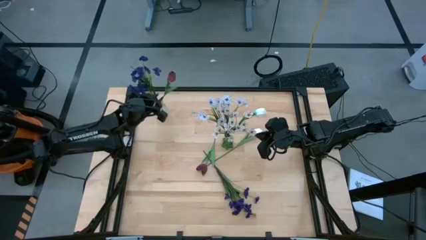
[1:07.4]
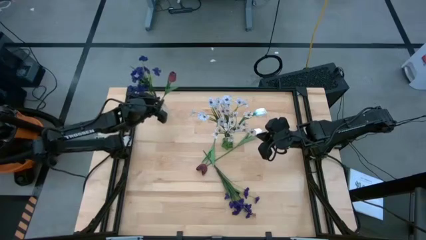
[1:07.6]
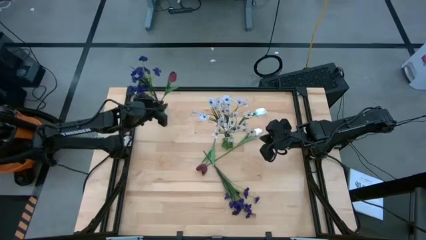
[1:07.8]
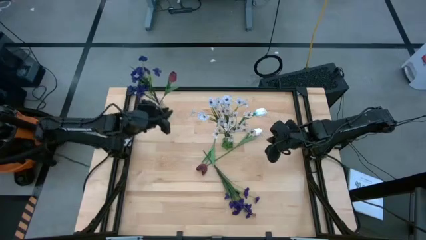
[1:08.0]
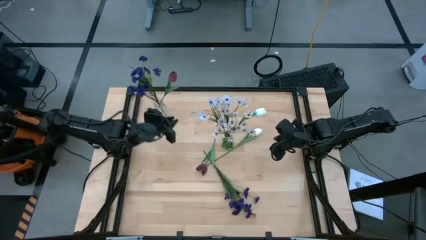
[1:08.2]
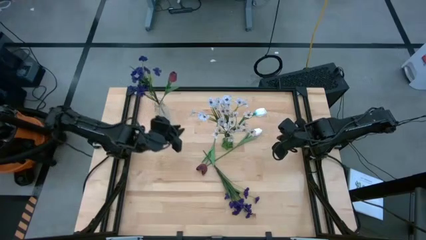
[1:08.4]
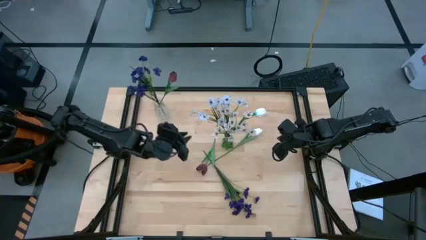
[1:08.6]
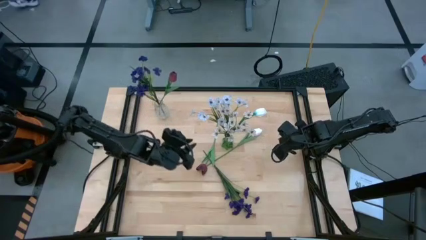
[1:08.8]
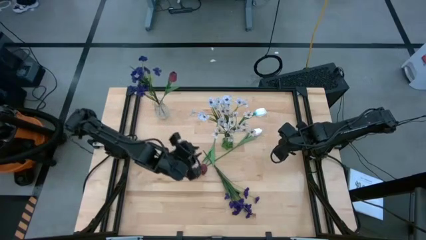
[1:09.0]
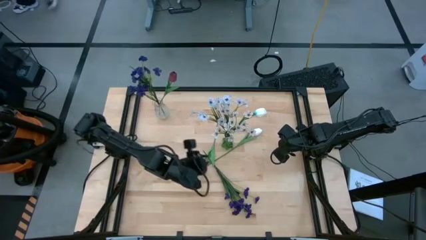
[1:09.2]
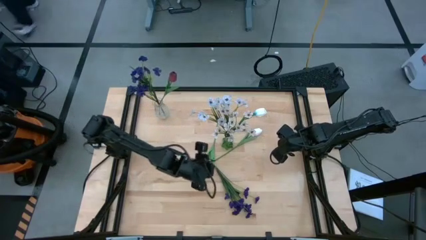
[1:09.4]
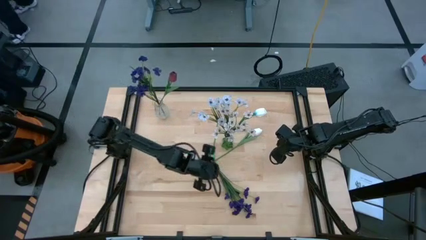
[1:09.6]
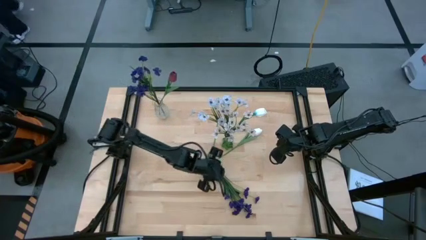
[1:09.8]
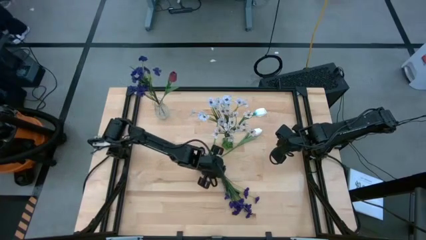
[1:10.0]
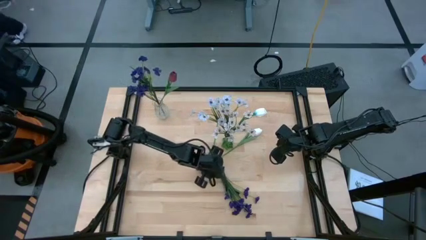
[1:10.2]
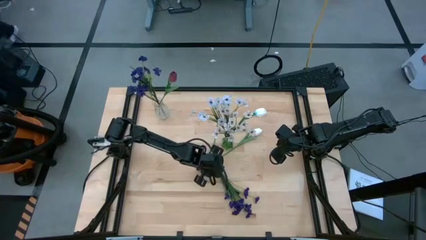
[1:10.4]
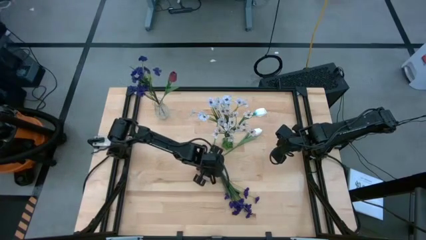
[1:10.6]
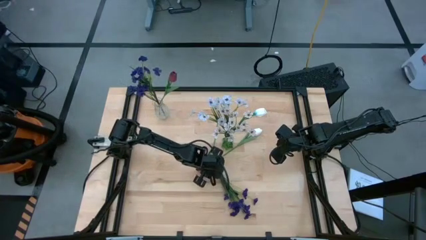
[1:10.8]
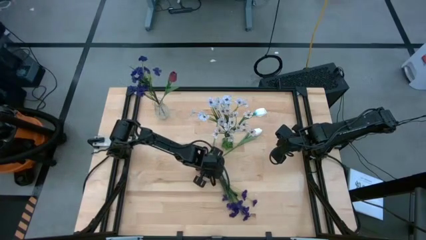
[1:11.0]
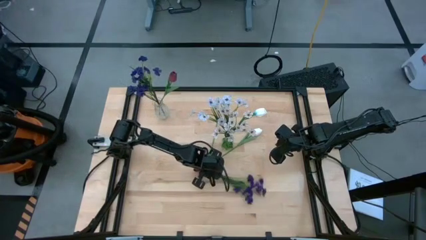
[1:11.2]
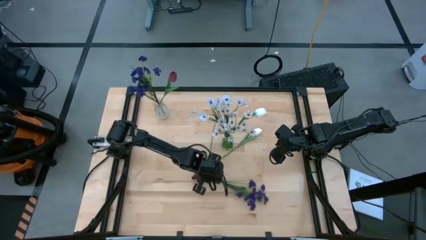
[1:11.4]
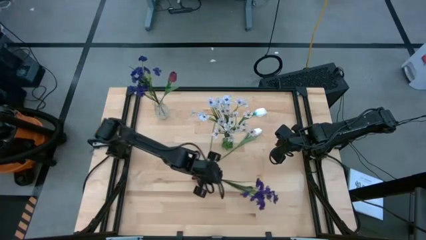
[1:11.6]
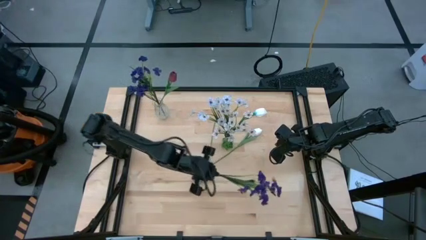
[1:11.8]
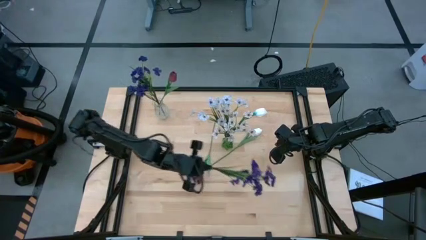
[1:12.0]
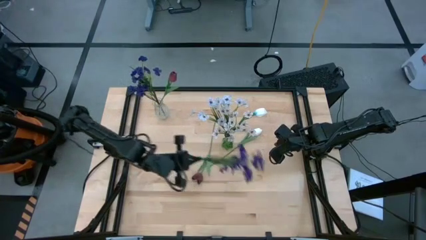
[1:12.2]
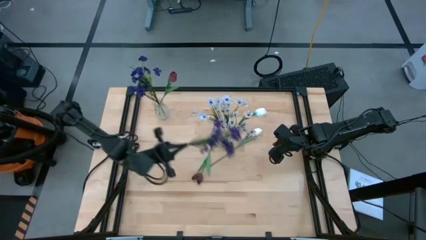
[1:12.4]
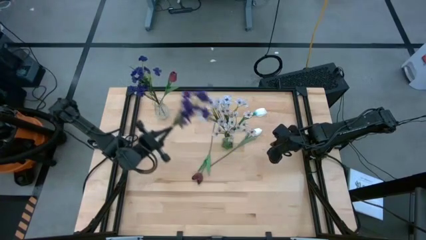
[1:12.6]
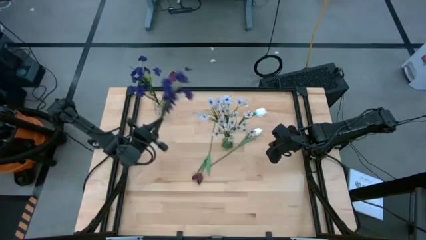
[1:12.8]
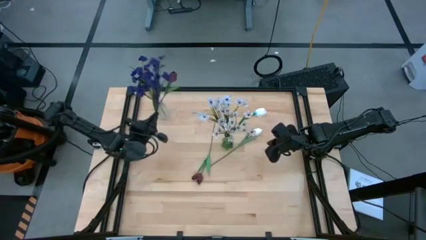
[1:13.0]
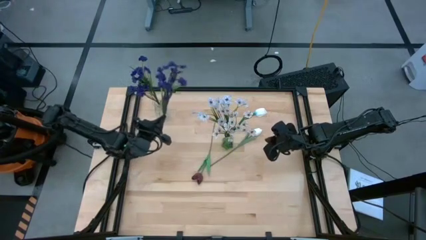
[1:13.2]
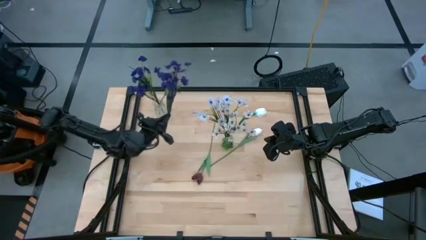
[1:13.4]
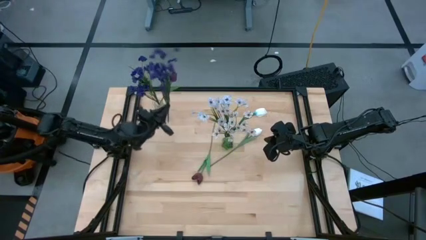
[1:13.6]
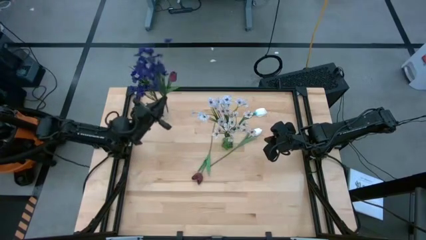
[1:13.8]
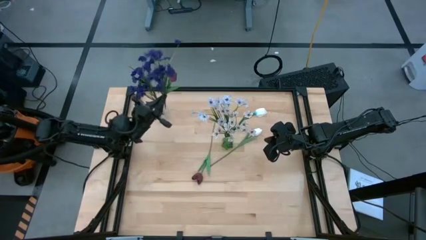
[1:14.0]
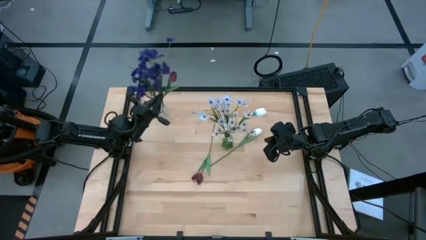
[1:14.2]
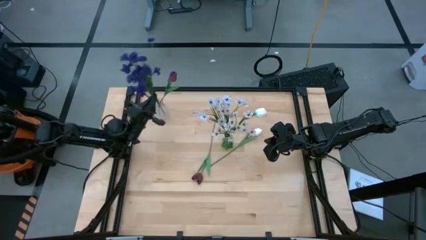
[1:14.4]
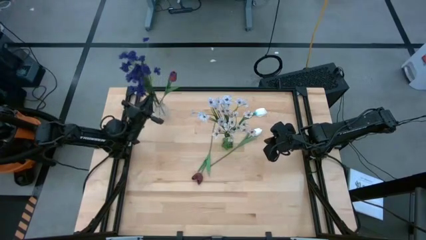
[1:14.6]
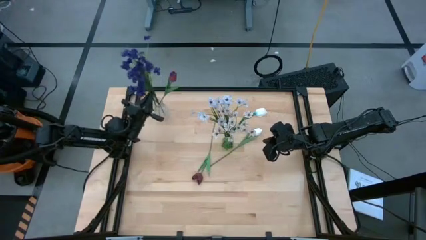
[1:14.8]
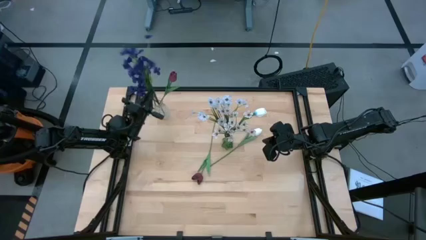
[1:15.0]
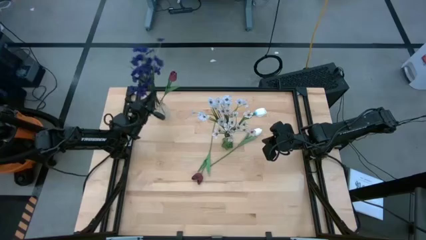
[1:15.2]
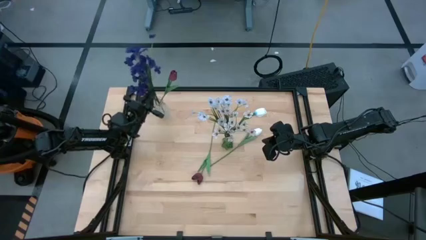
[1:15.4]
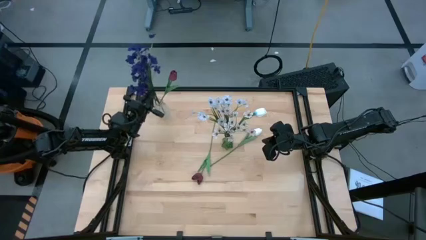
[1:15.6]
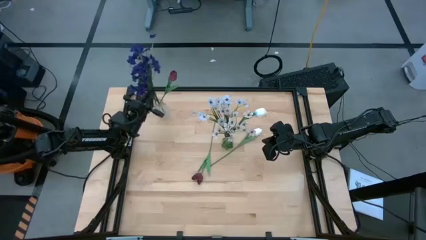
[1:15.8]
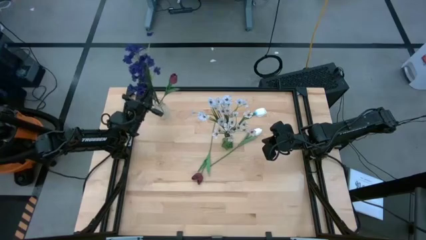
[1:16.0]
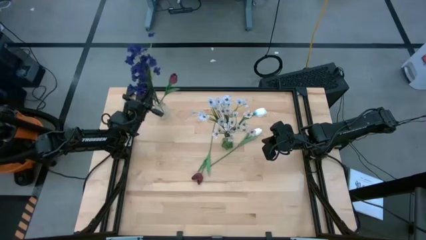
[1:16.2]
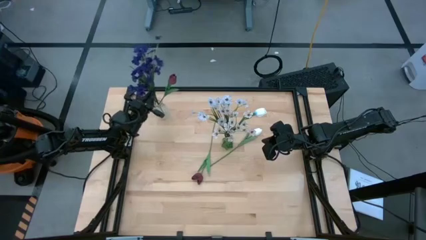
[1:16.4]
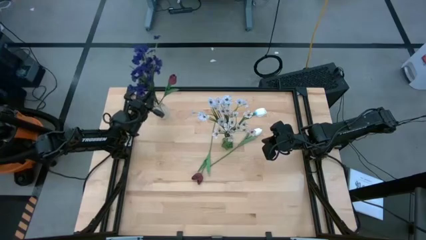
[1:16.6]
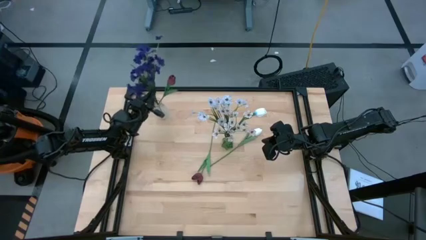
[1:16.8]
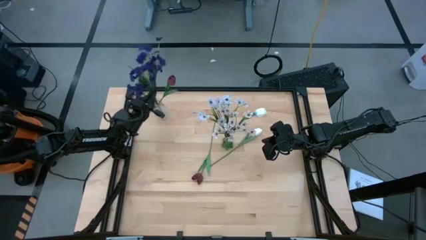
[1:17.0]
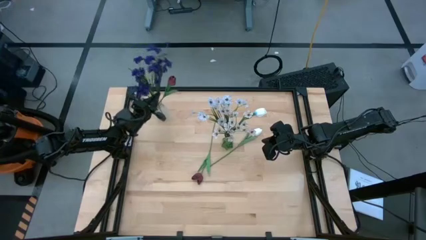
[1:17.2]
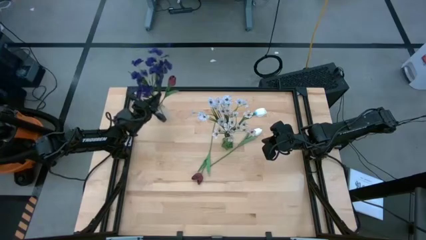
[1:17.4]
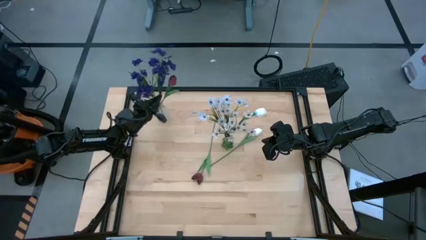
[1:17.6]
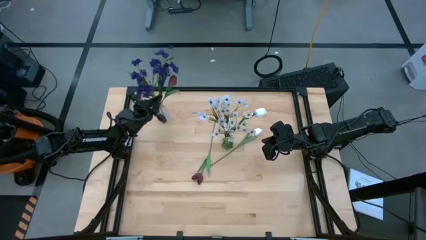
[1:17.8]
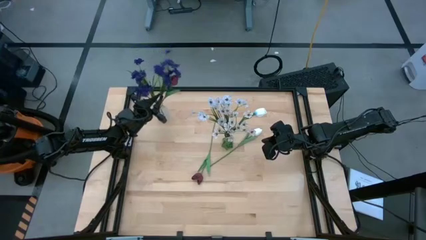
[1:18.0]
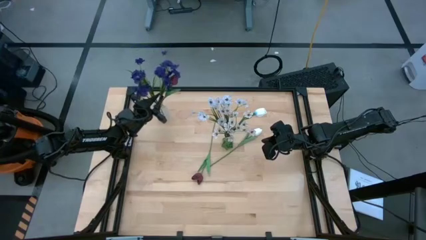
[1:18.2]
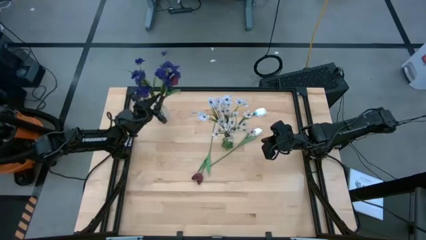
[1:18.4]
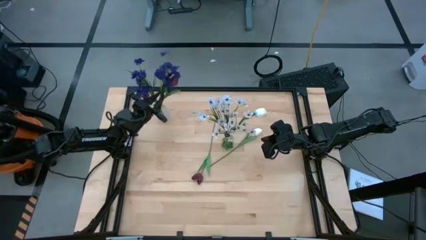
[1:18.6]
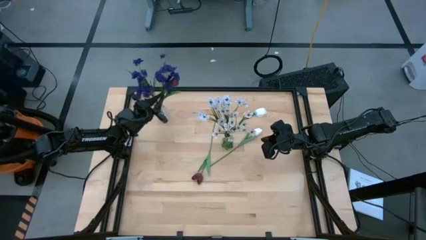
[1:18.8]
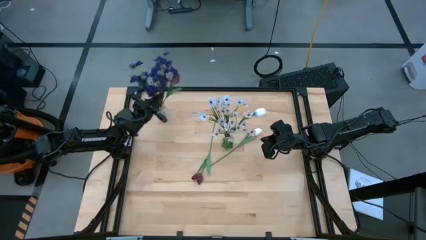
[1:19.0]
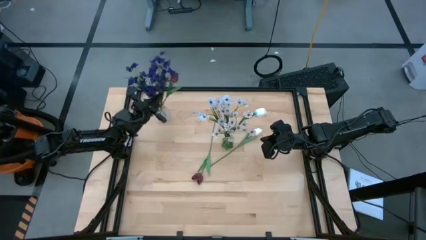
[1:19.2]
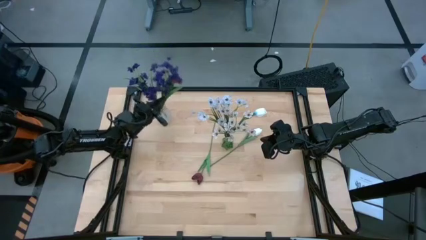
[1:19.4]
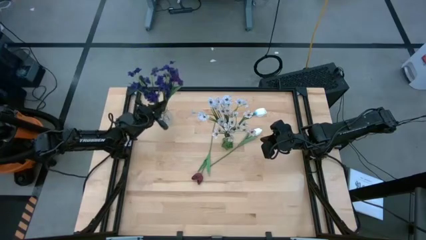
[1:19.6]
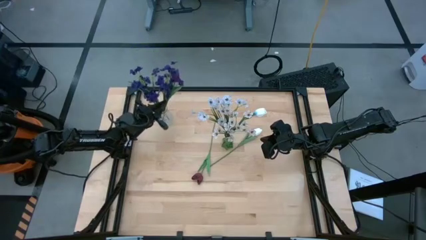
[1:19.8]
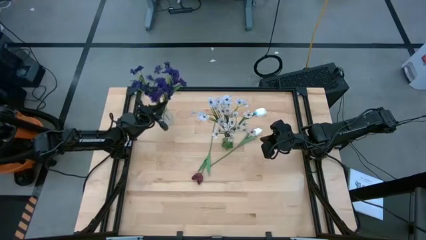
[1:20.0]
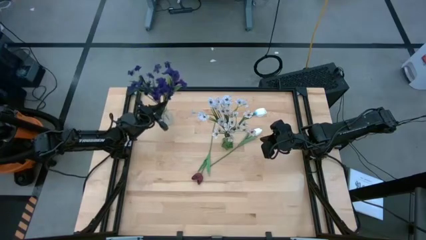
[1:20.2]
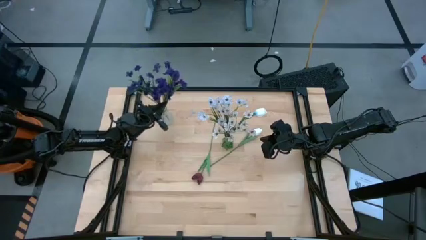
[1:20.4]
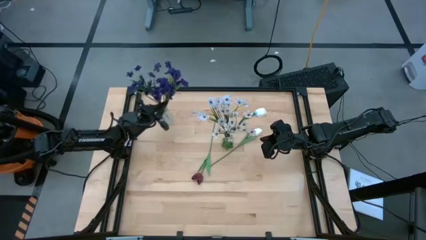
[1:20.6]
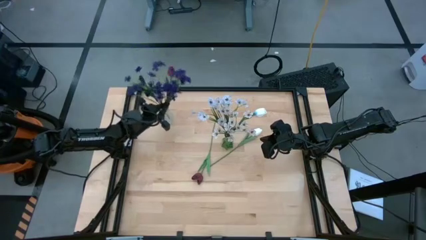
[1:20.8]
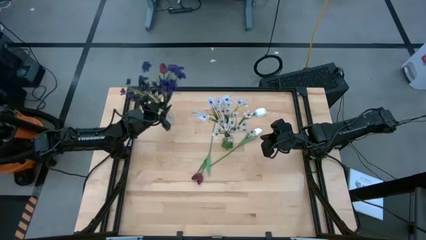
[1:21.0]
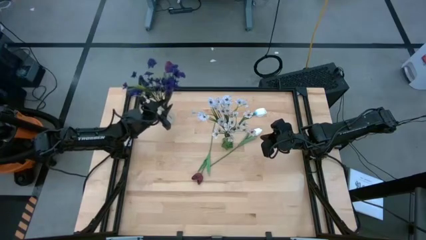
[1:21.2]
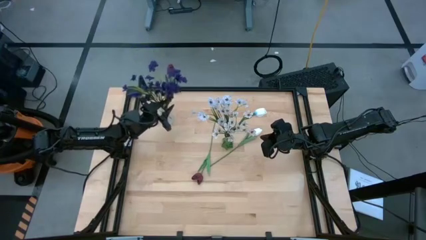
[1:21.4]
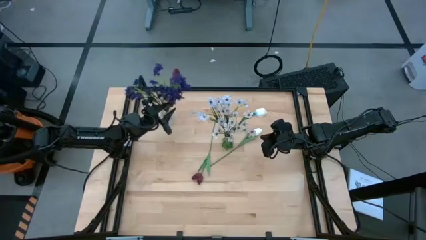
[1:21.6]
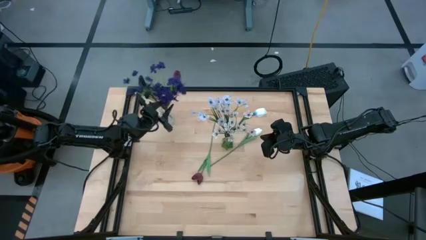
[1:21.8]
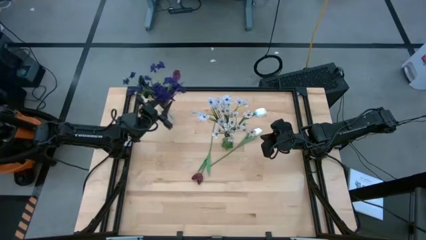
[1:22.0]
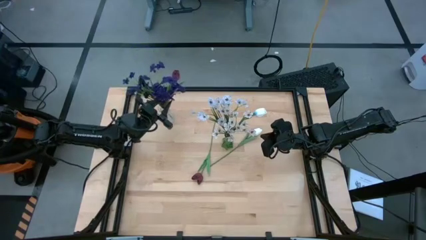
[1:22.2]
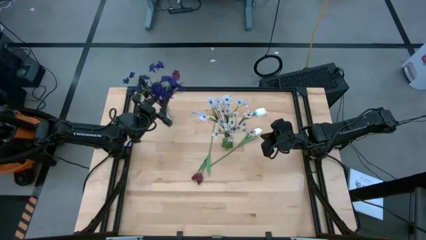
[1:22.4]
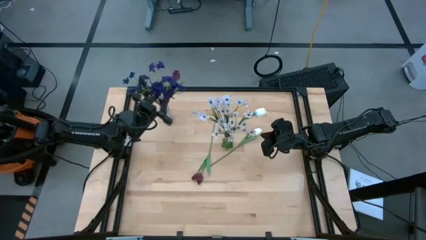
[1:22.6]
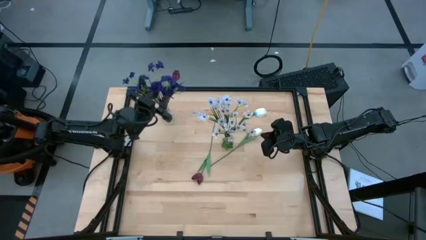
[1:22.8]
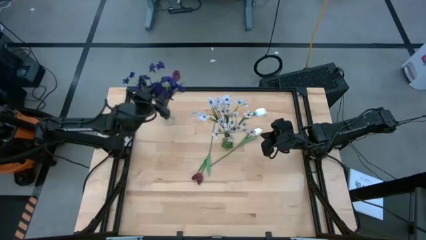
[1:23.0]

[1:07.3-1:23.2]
Task: Sort flowers into vase by color
Put the violet flowers into the transparent vase
